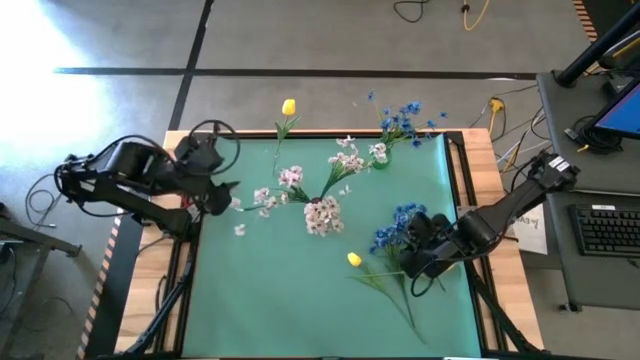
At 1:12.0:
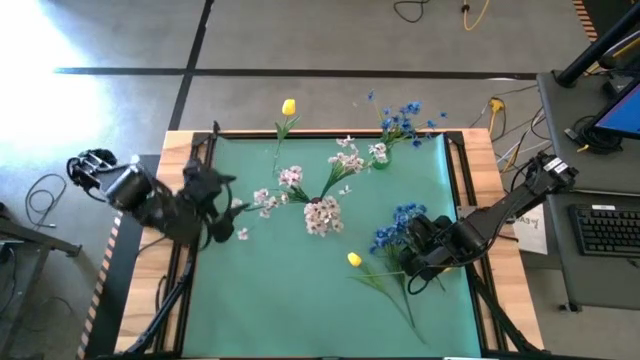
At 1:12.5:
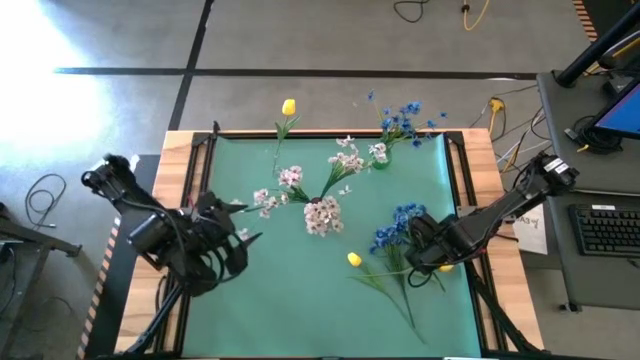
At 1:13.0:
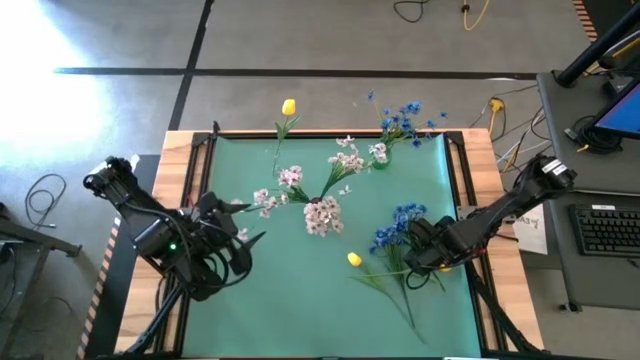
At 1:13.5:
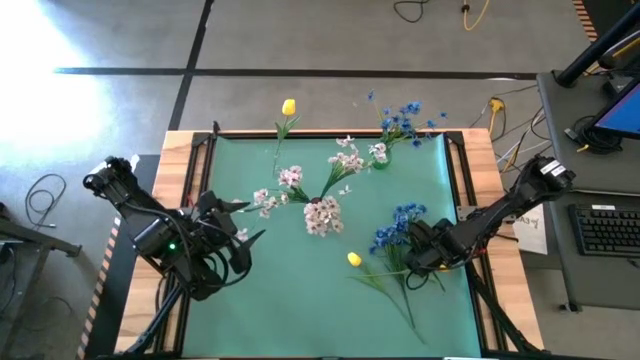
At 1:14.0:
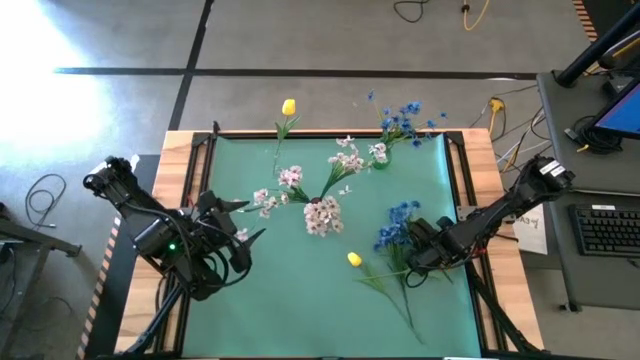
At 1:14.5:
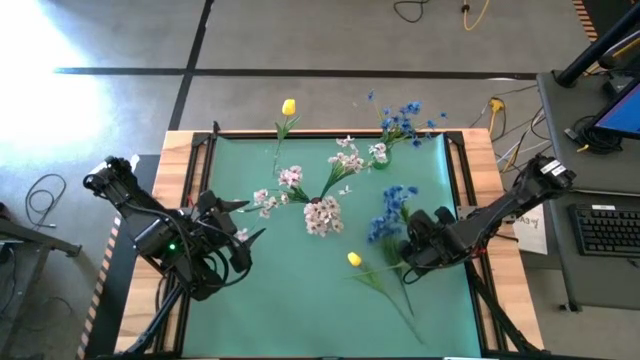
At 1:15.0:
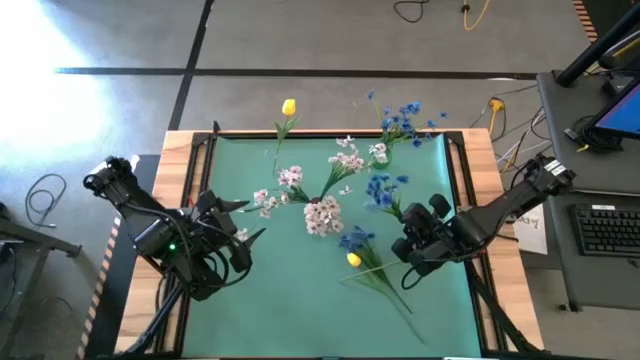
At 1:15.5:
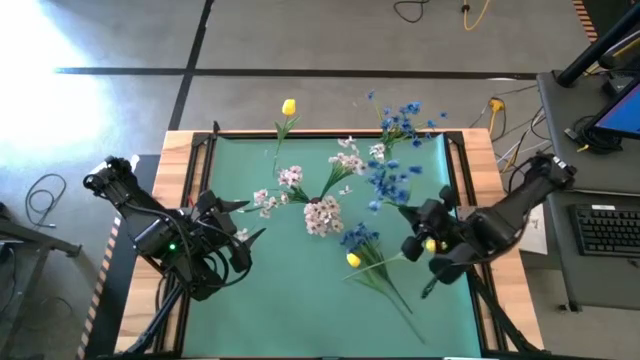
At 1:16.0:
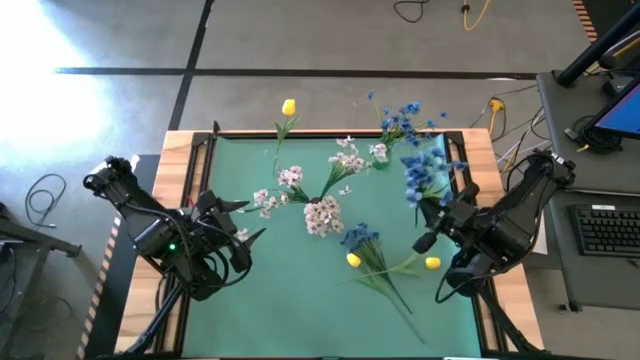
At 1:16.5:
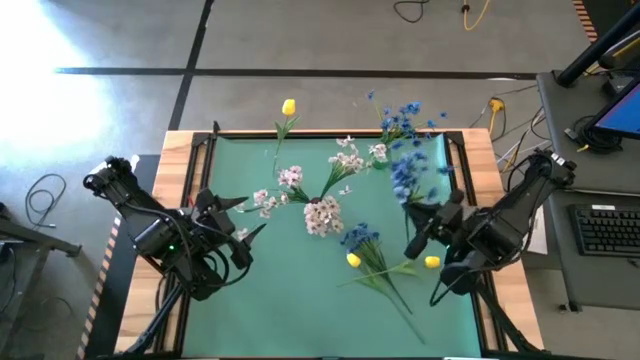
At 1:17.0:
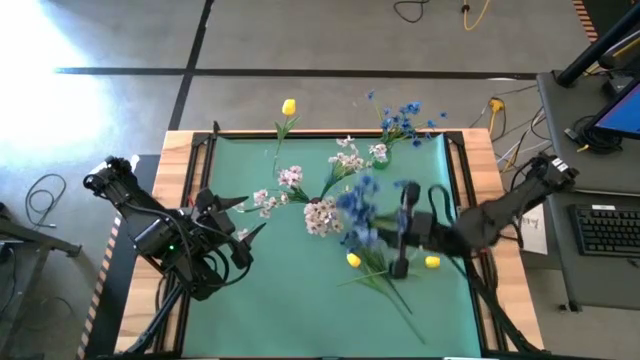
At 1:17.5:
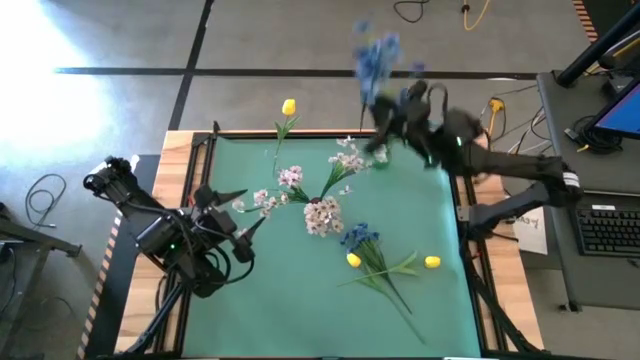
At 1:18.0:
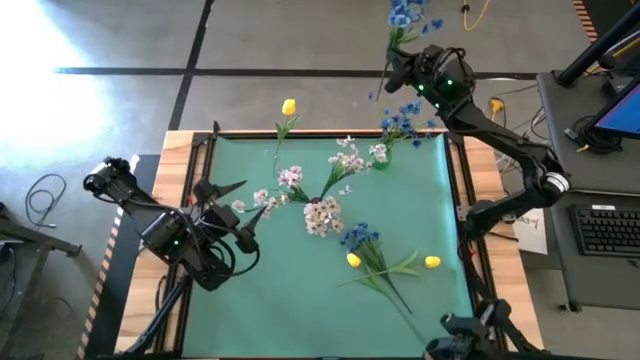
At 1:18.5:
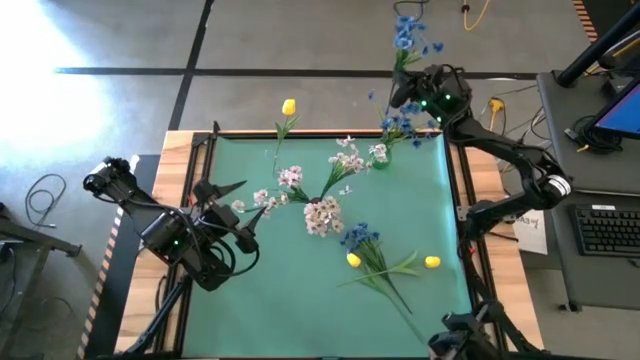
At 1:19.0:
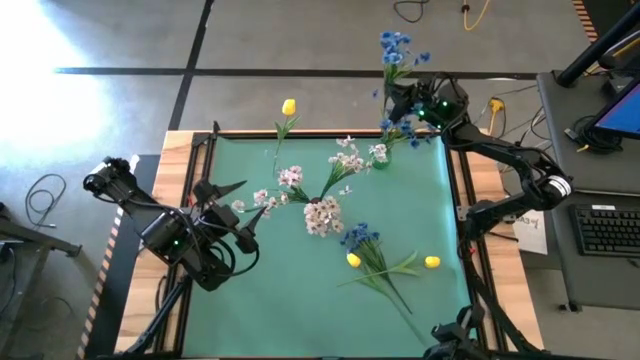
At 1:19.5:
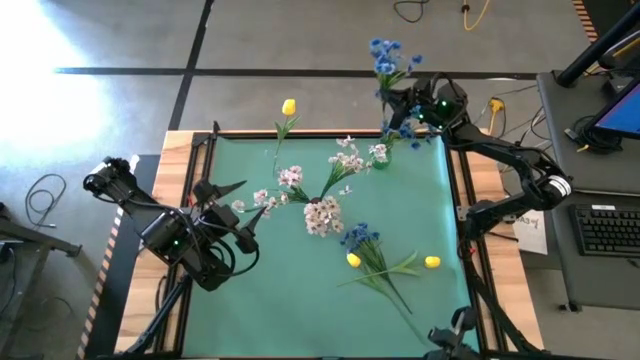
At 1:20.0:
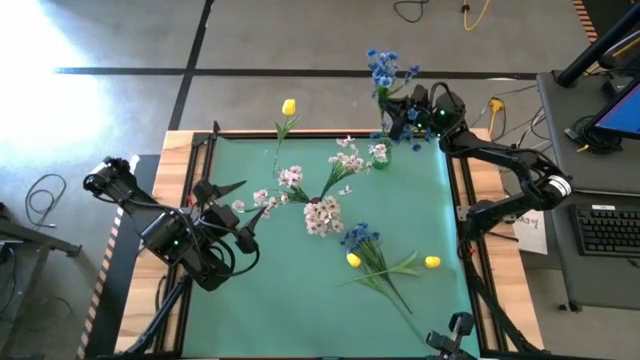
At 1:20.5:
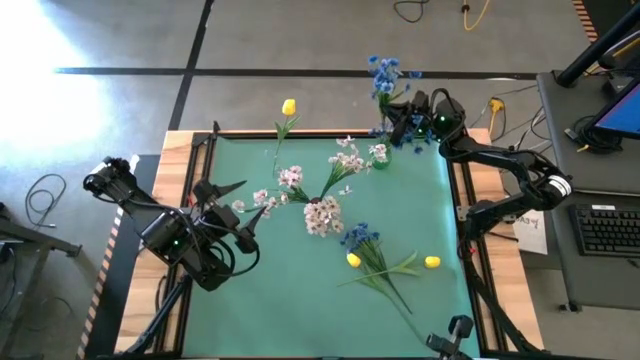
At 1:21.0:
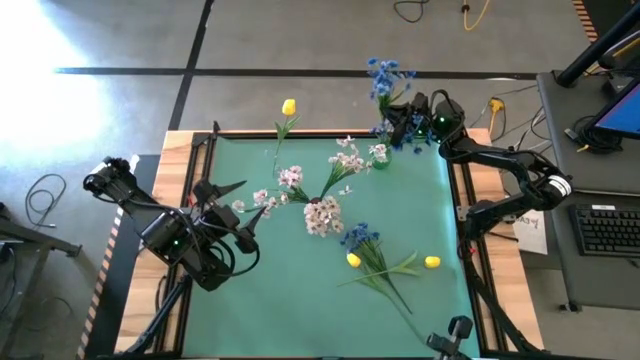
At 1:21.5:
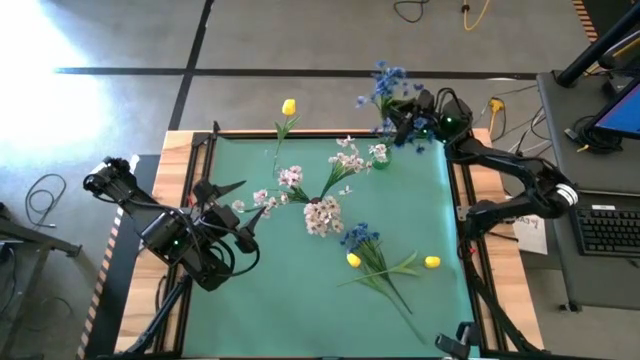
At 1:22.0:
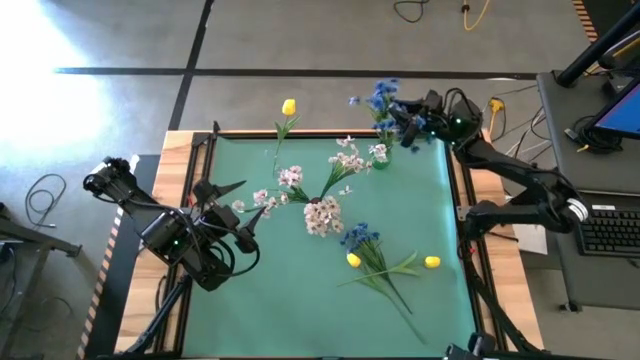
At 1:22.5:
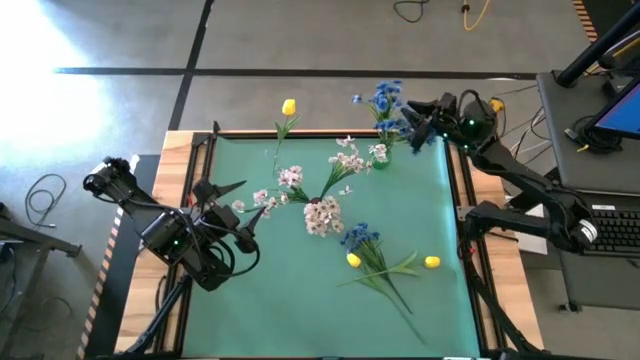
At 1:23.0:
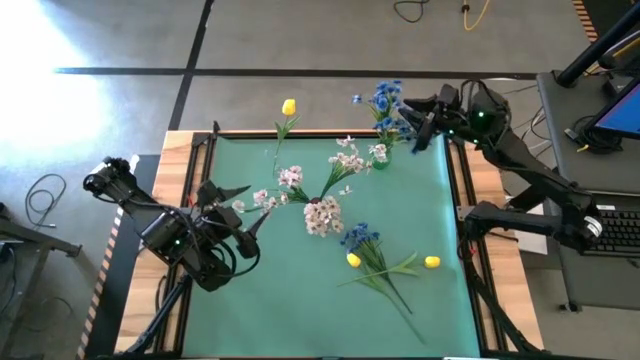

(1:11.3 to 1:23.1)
Task: Sort flowers into vase by color
Put the blue flowers into the green vase
